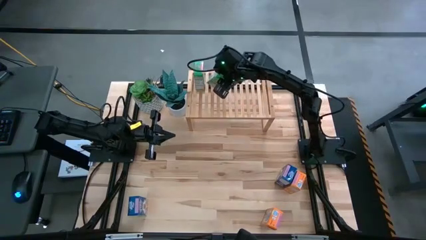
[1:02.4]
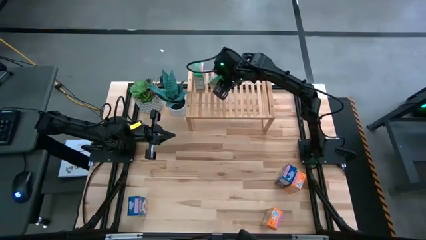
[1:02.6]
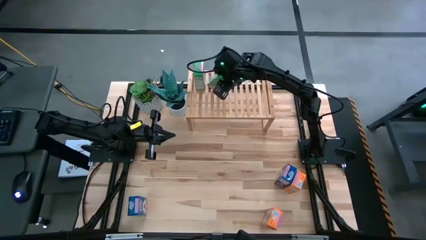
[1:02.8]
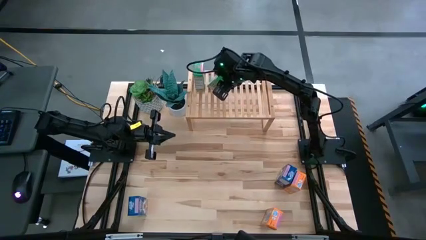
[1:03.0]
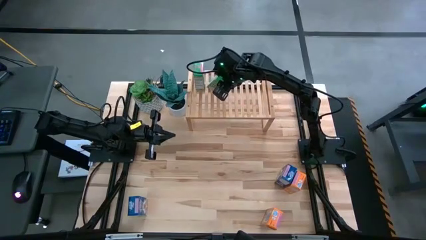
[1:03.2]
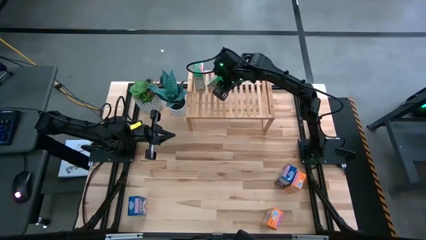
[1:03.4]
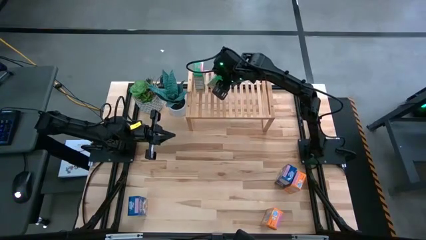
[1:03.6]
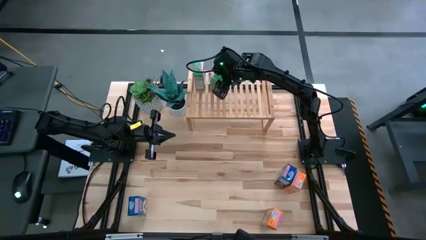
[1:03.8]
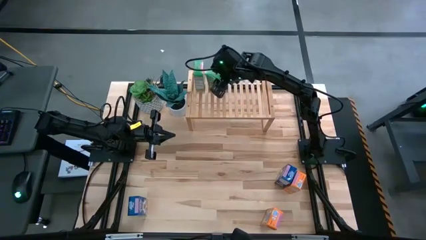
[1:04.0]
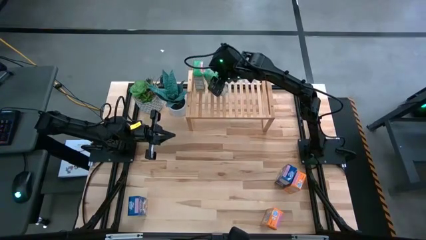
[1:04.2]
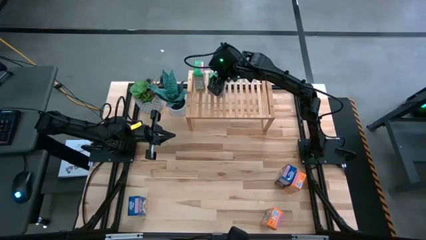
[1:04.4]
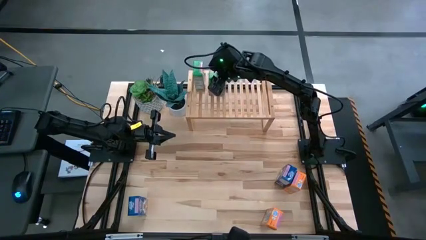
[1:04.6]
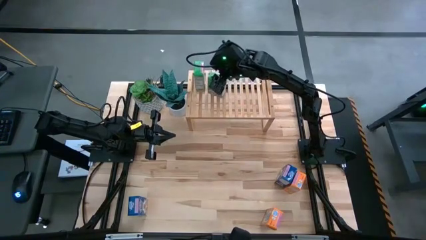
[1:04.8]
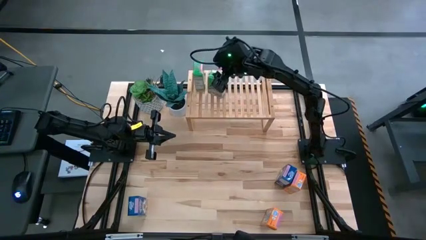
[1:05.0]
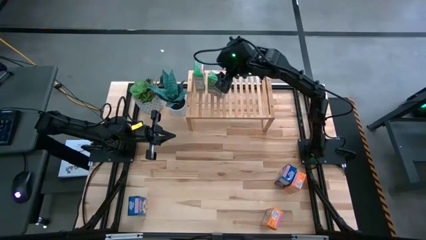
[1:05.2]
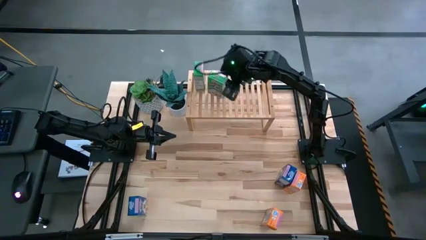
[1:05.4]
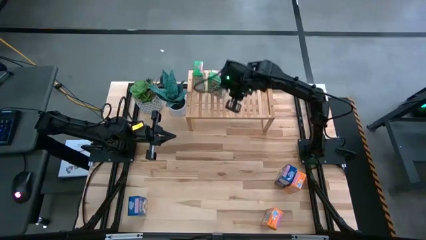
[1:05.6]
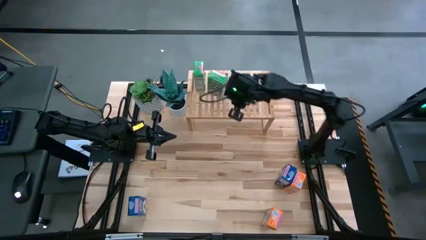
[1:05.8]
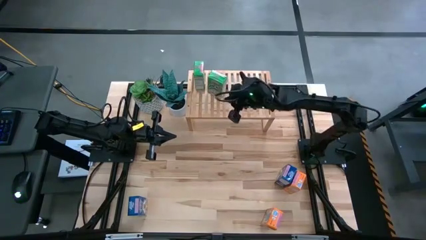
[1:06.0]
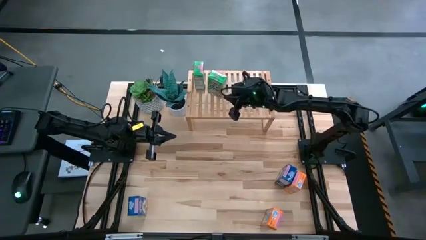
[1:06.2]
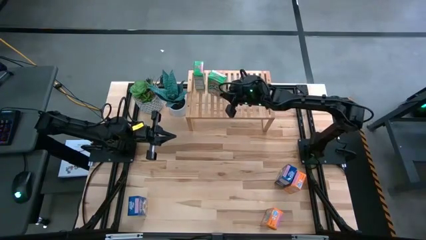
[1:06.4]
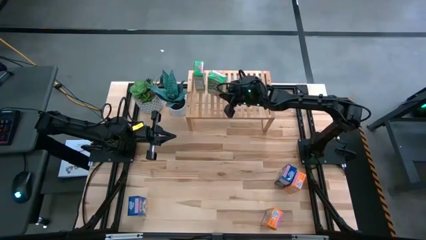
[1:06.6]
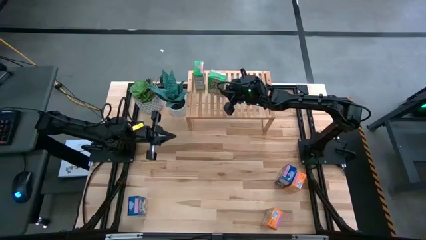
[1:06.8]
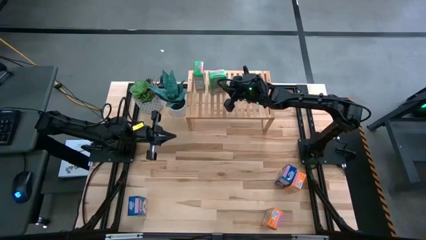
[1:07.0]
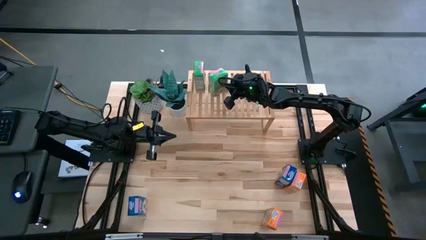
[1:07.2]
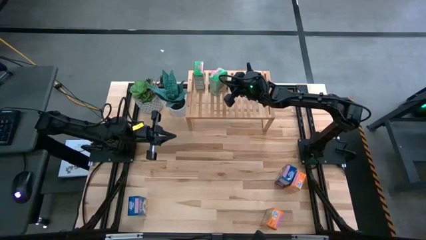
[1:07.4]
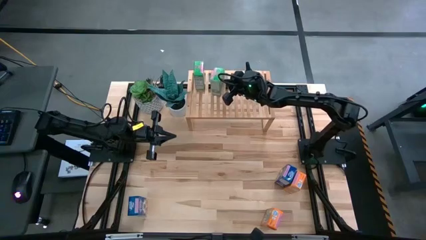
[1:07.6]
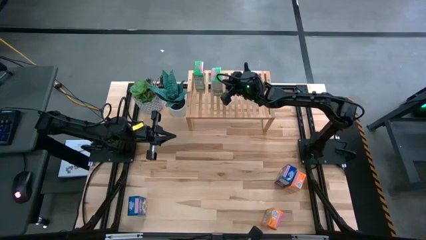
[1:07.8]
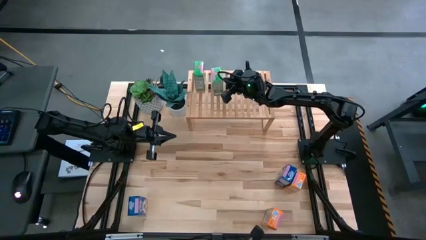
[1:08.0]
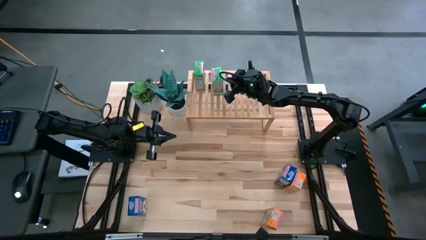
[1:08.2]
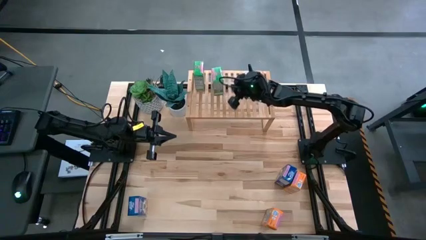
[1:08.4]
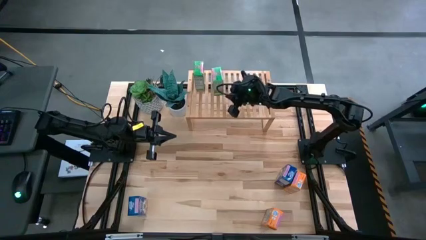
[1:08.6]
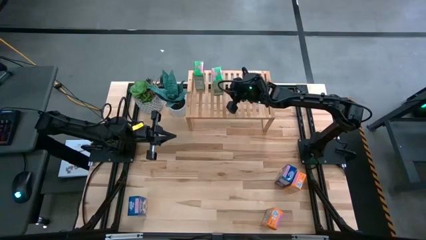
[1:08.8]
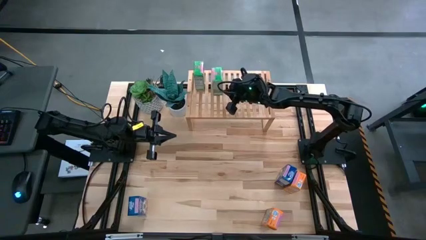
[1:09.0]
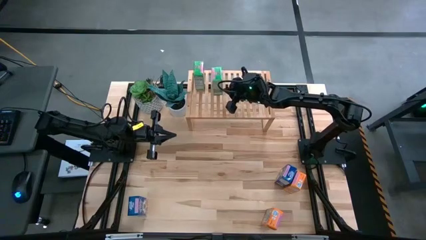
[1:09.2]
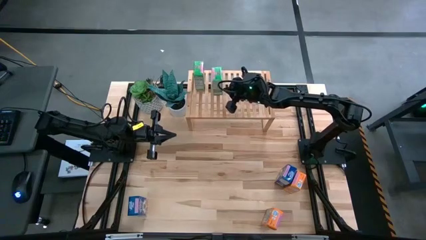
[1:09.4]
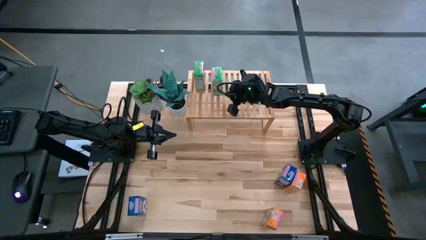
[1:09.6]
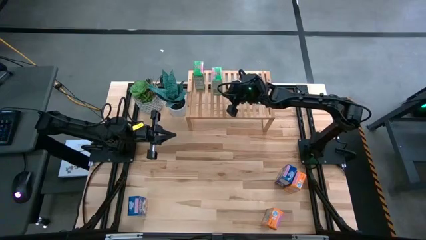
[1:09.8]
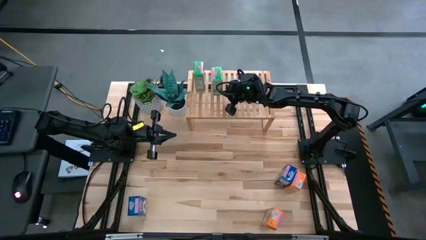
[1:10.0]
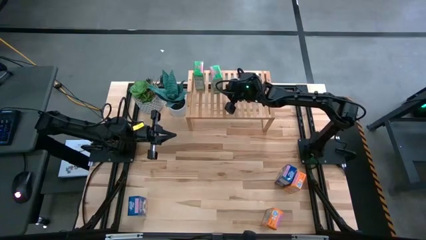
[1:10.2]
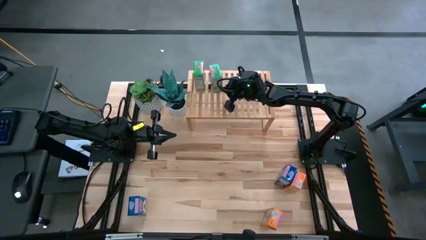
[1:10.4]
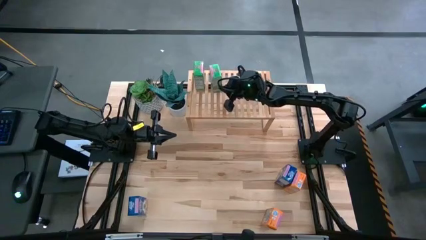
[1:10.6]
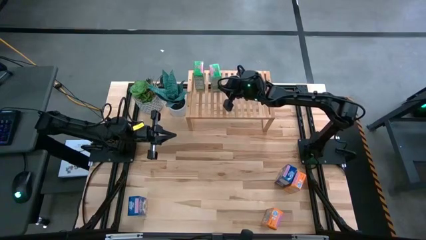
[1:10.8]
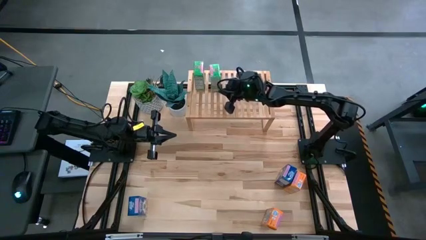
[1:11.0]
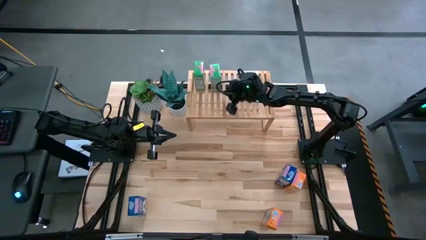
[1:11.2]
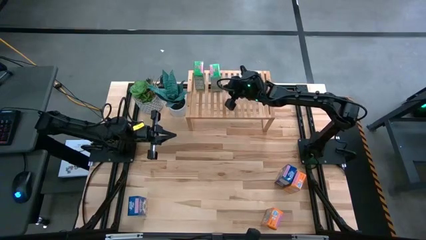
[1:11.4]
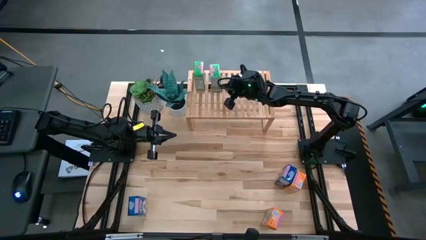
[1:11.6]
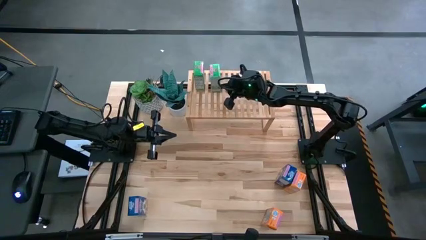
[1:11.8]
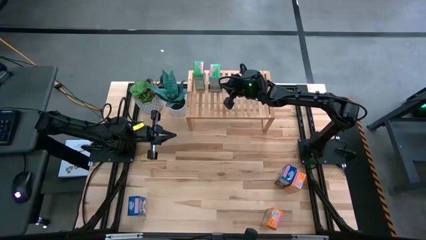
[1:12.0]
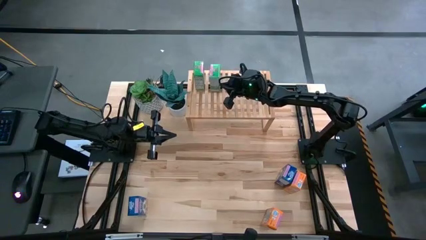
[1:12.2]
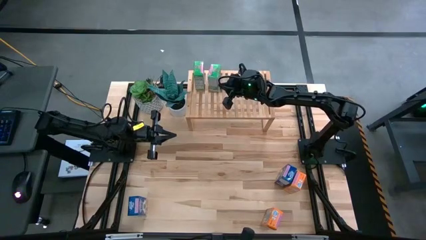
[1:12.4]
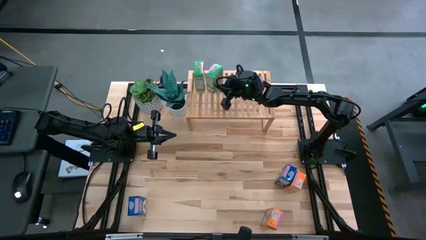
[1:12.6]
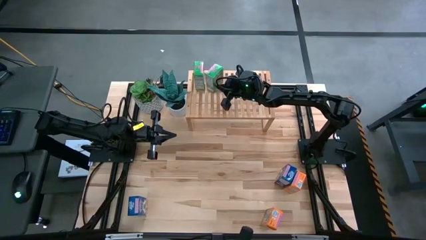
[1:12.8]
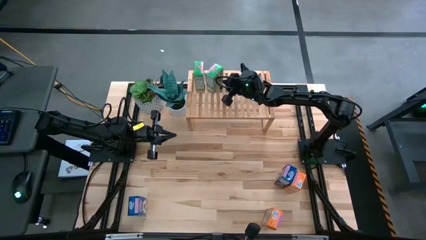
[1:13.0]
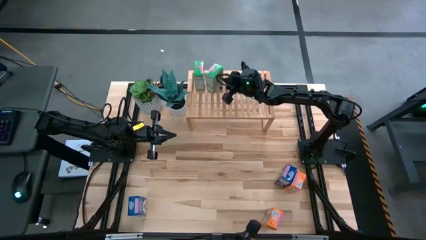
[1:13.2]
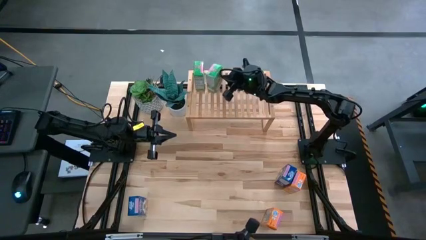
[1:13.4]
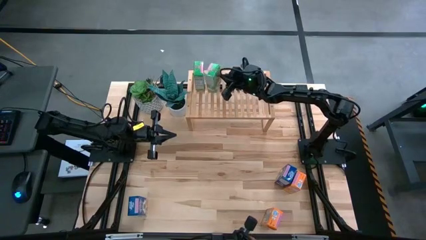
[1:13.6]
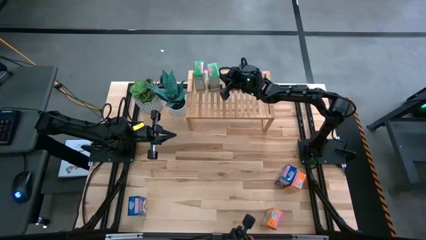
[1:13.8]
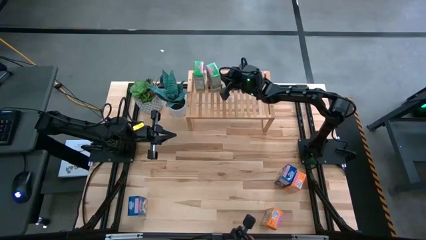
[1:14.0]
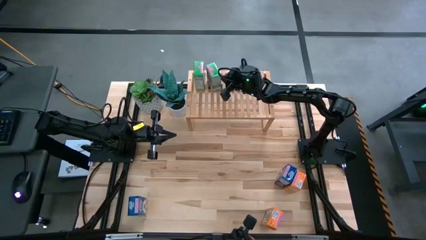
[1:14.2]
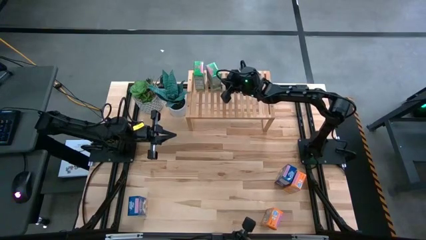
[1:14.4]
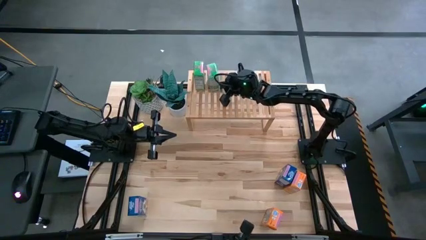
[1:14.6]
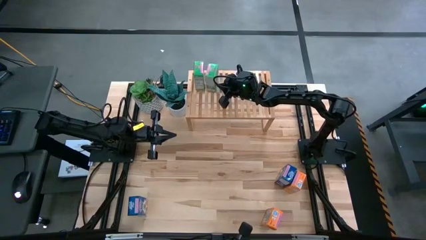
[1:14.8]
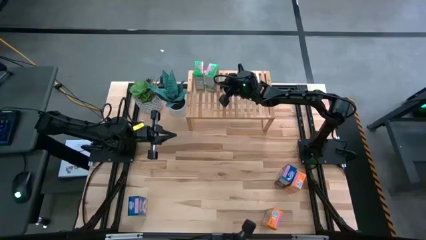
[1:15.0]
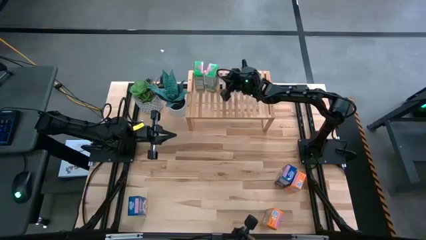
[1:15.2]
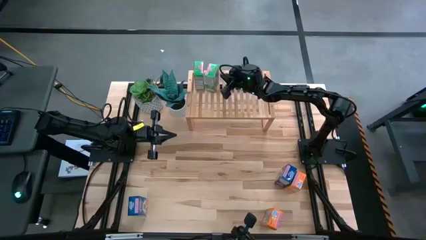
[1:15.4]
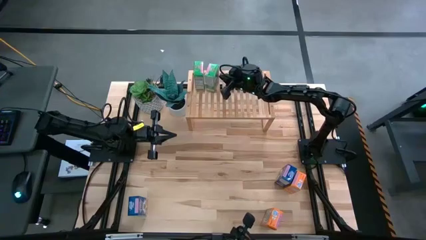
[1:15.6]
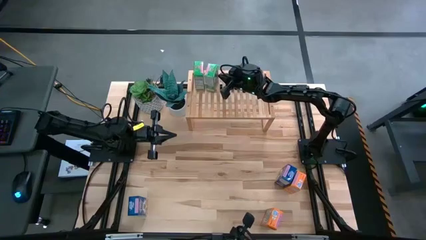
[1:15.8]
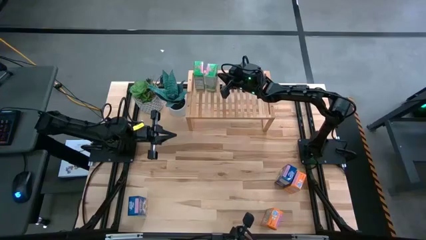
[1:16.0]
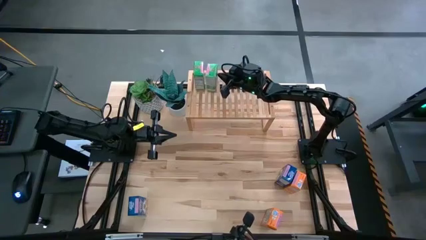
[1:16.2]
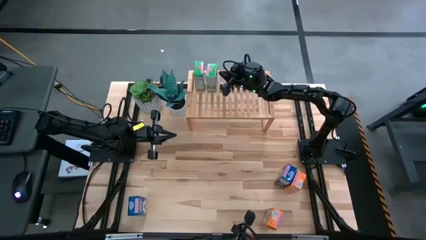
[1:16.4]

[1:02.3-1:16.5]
Task: Stack cereal on shelf
Put the green cereal box on the shelf aligned with the other green cereal box

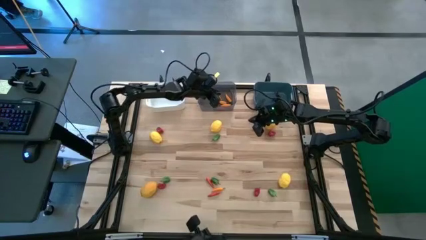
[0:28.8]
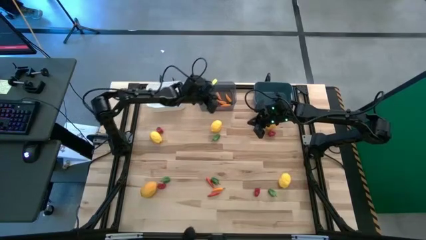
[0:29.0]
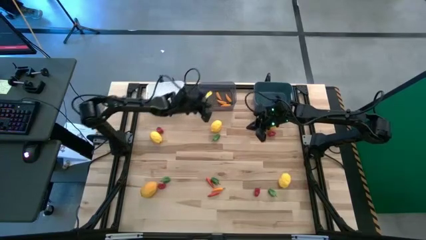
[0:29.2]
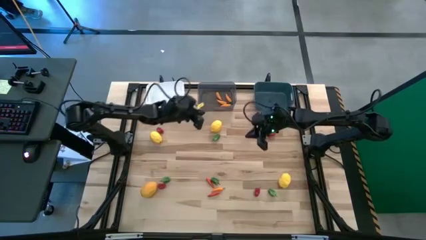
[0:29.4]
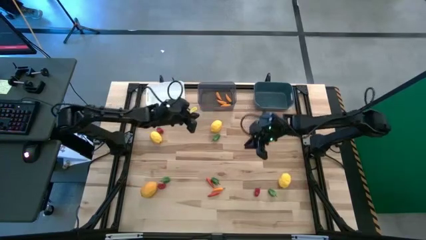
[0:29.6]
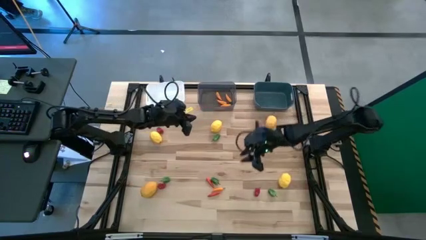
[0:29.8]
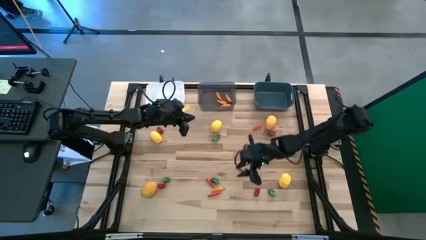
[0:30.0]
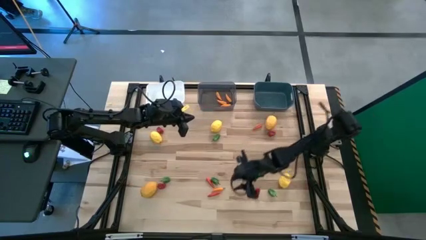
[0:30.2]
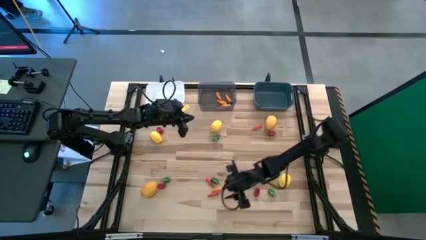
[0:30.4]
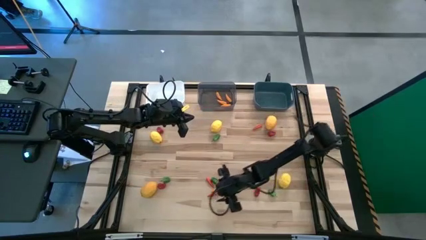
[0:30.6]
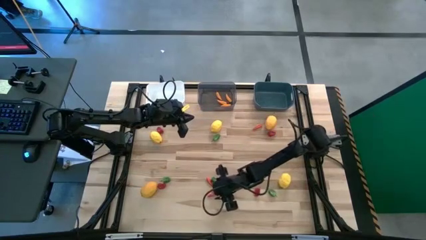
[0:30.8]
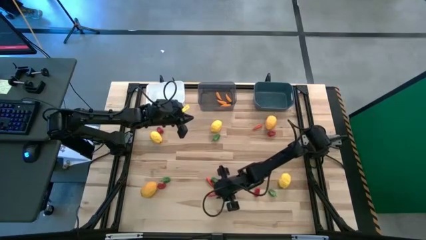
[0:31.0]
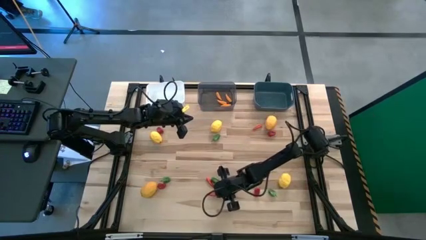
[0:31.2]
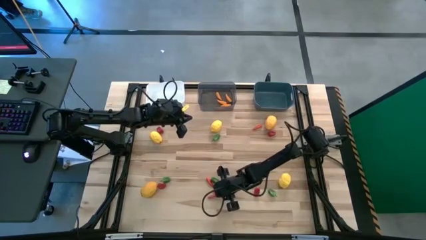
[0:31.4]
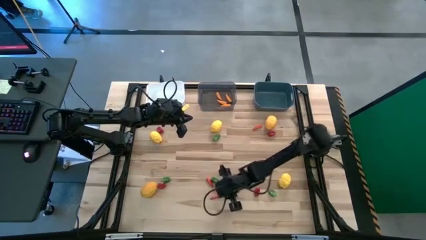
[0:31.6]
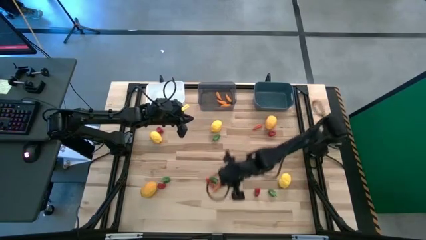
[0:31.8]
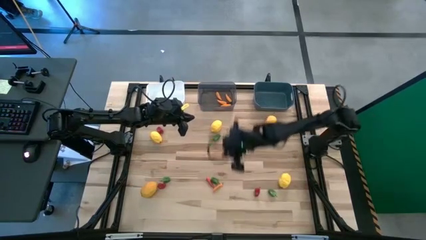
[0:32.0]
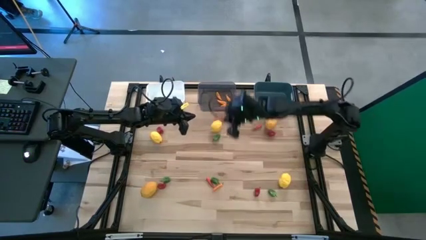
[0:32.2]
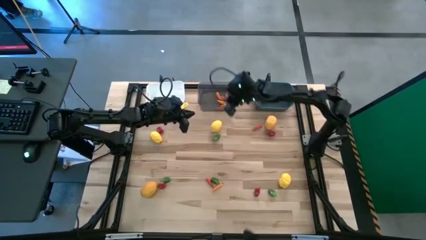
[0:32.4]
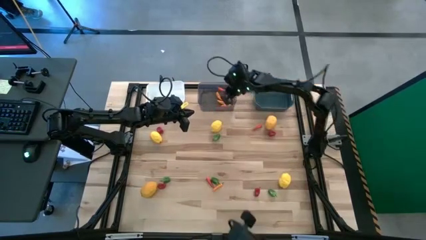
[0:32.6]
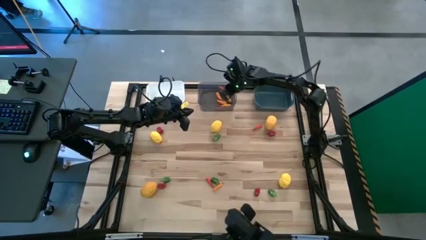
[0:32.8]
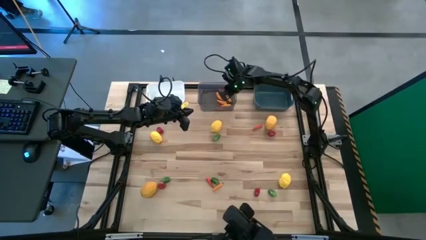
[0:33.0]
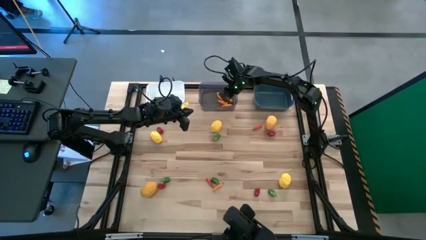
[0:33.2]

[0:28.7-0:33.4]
Task: Sort produce into baskets
Put the bottom orange chili pepper into the black bin
